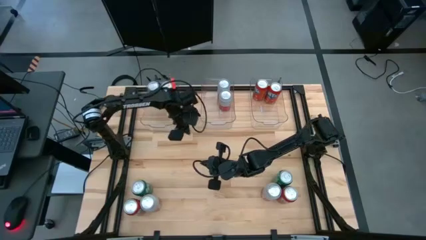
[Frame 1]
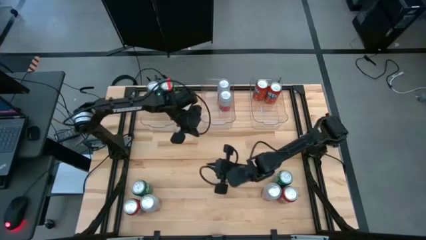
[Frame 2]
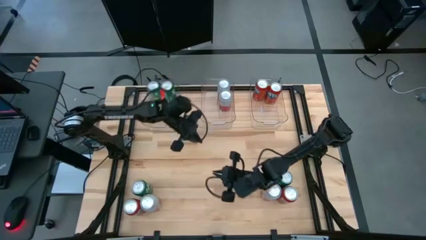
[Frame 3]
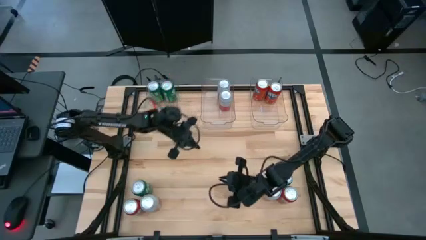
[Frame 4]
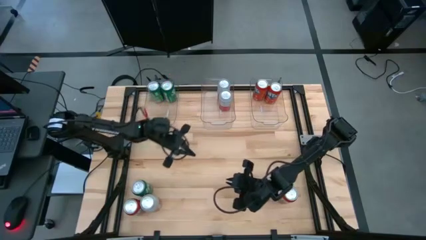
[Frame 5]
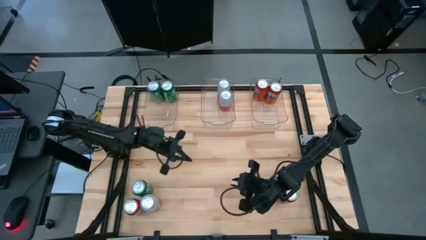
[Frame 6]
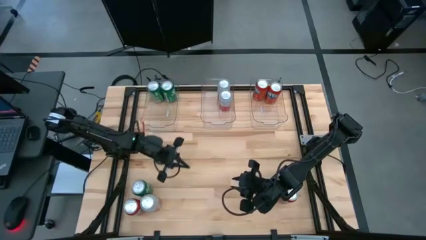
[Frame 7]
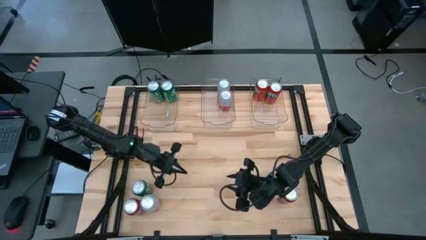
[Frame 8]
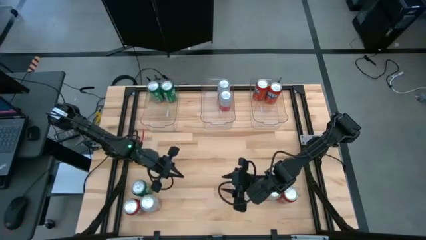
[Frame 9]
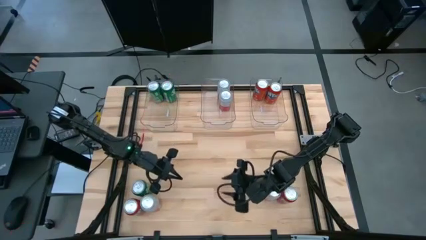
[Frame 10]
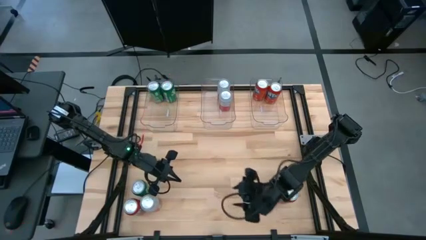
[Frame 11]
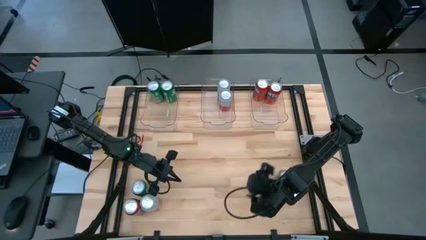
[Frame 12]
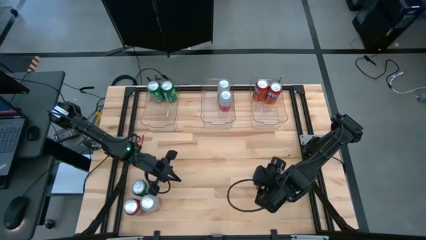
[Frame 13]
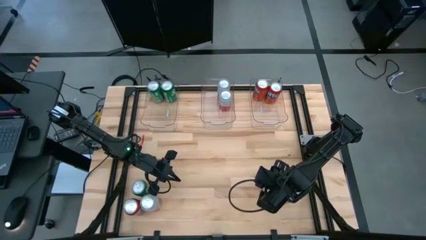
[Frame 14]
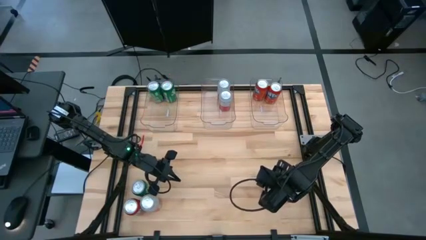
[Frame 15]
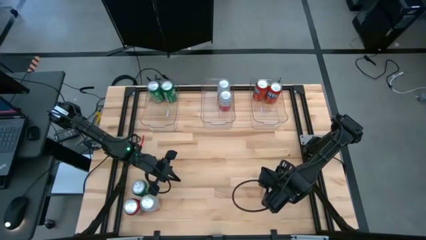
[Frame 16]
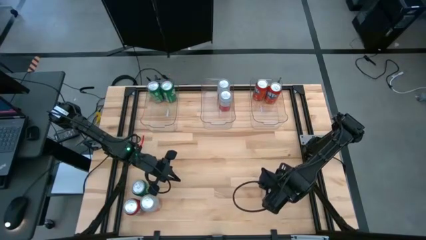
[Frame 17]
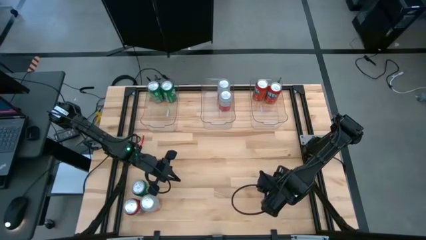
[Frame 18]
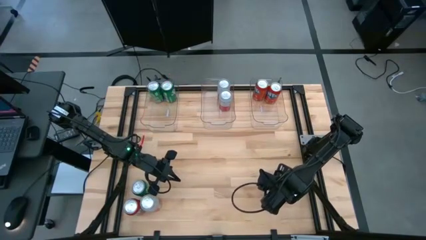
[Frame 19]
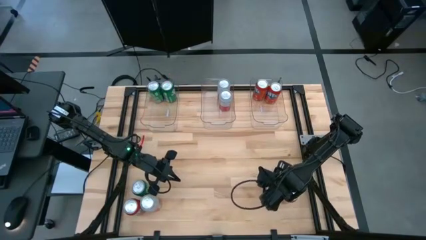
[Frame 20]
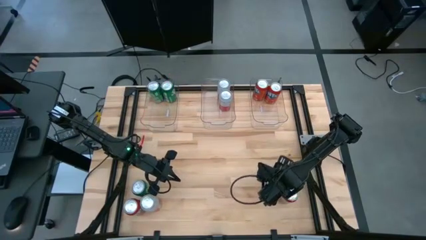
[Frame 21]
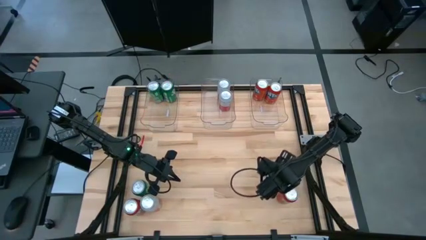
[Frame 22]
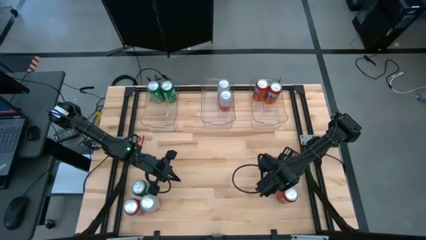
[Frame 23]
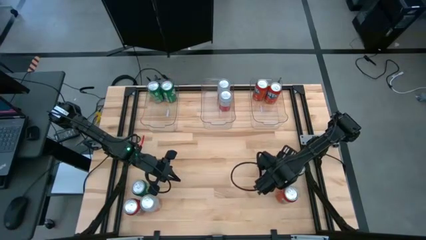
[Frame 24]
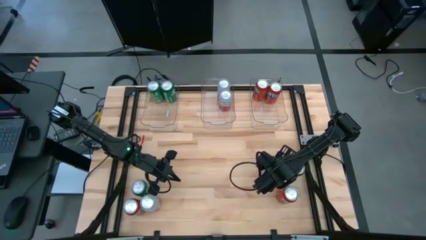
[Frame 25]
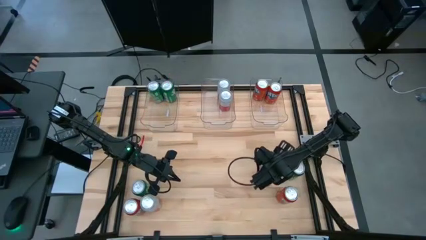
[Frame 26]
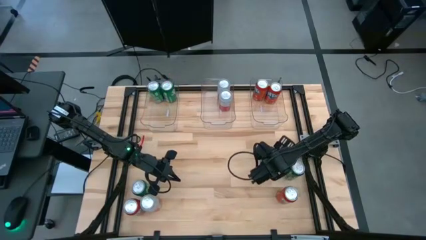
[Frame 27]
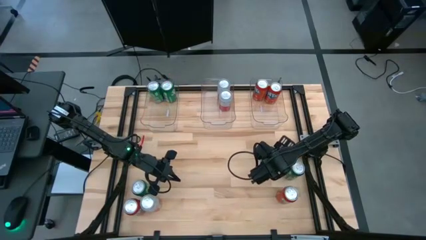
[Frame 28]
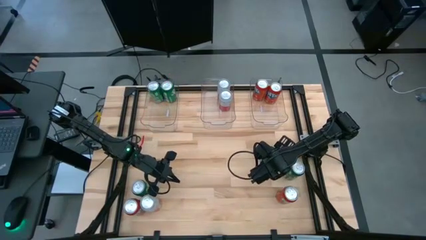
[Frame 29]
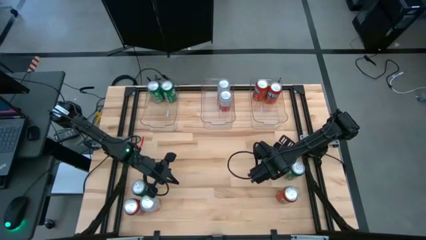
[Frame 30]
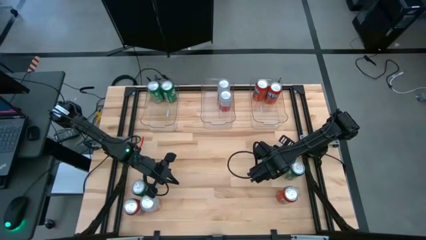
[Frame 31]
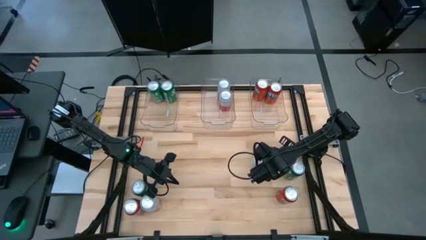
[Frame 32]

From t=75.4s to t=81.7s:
Task: Sort soda cans
Put the pink-white soda can into the middle transparent bin

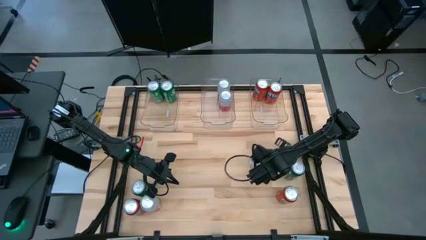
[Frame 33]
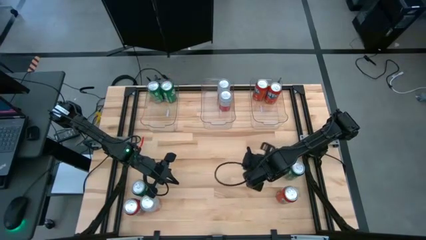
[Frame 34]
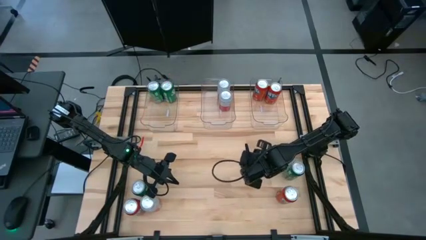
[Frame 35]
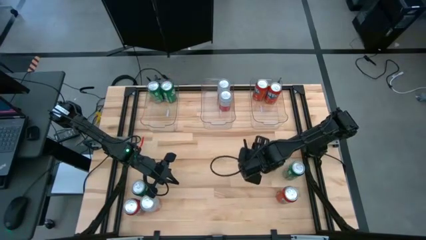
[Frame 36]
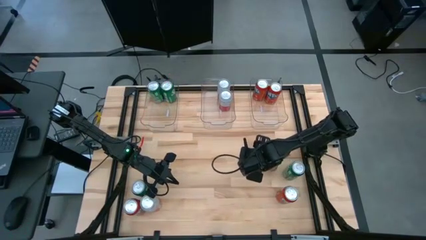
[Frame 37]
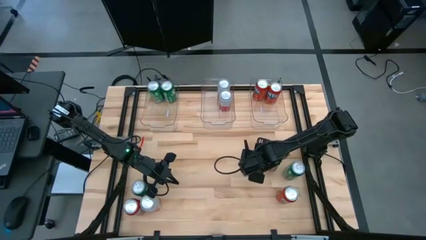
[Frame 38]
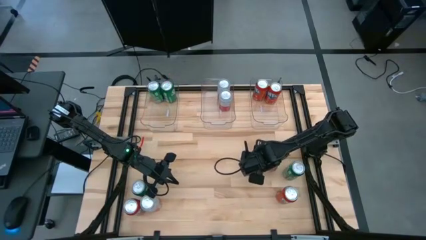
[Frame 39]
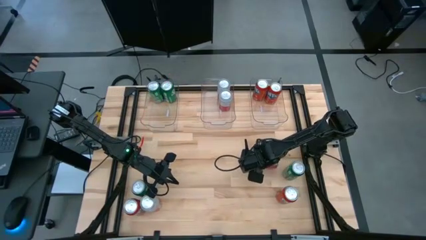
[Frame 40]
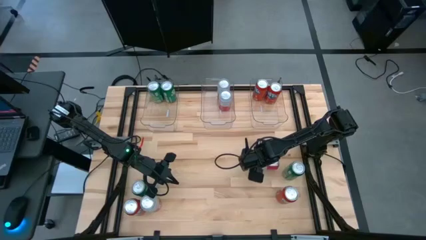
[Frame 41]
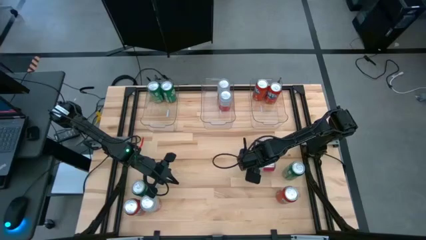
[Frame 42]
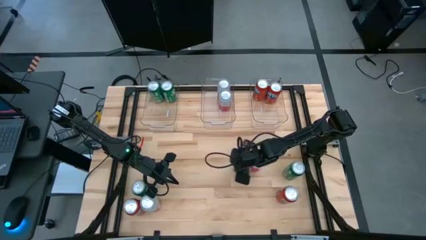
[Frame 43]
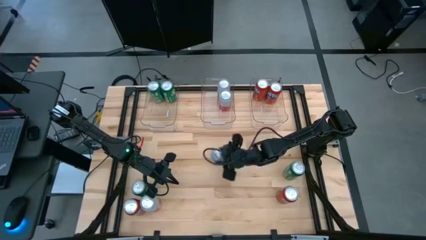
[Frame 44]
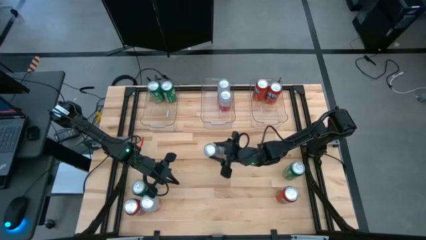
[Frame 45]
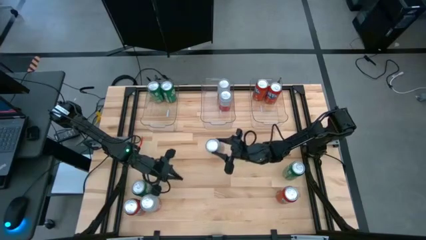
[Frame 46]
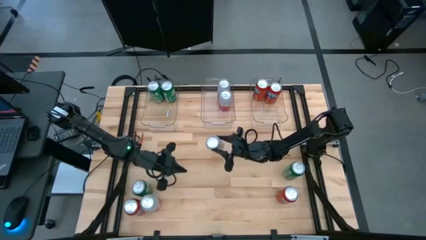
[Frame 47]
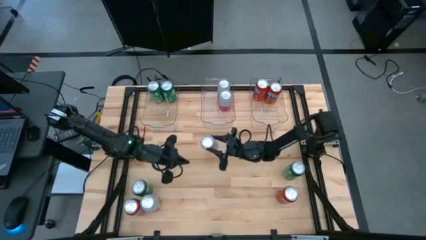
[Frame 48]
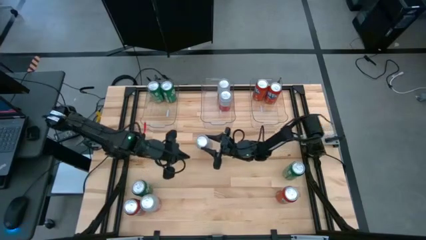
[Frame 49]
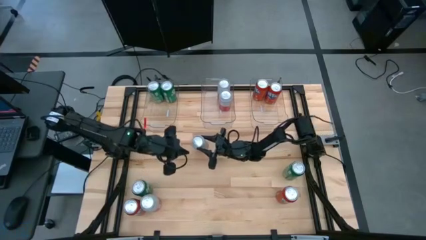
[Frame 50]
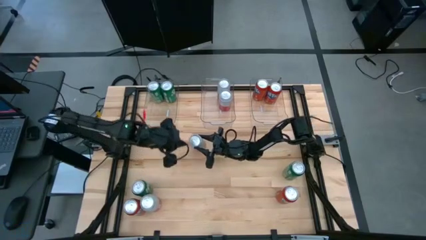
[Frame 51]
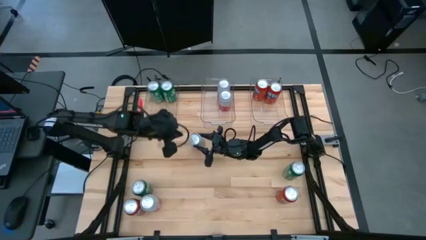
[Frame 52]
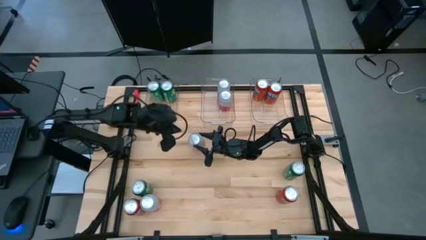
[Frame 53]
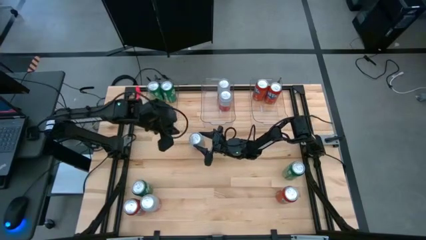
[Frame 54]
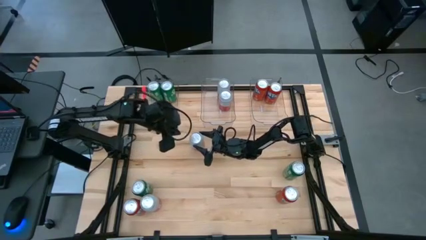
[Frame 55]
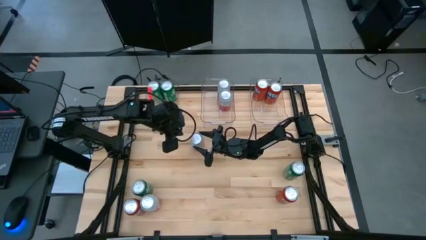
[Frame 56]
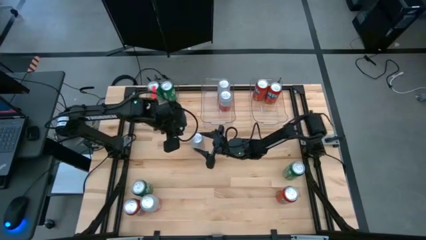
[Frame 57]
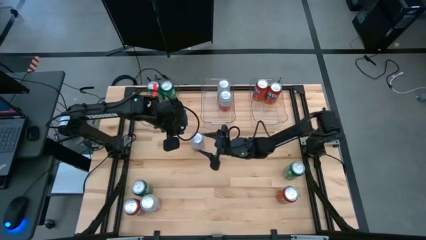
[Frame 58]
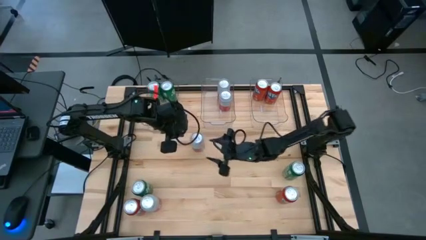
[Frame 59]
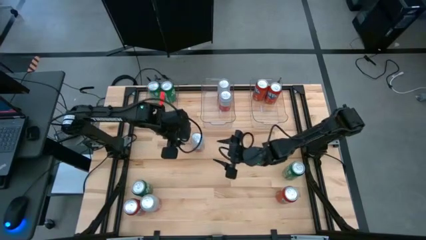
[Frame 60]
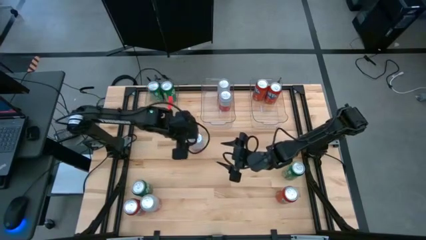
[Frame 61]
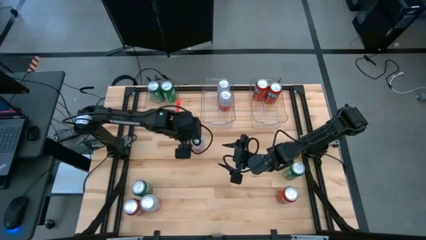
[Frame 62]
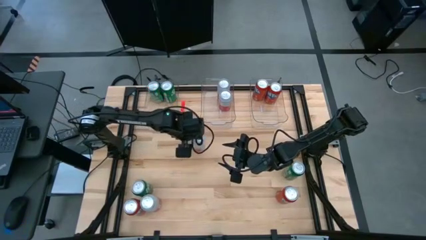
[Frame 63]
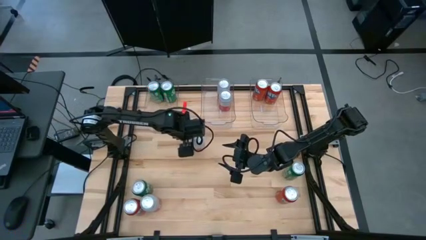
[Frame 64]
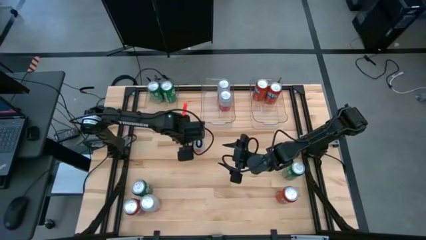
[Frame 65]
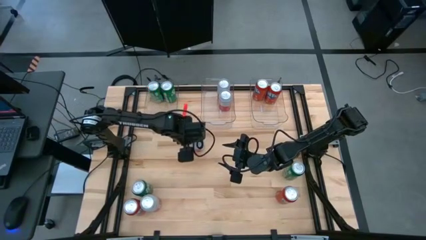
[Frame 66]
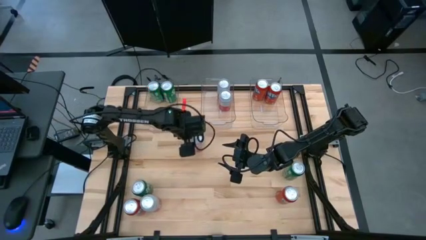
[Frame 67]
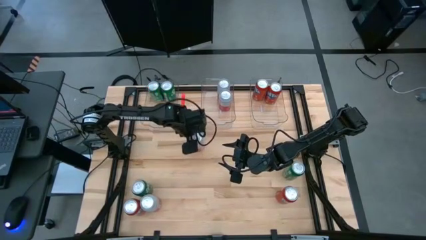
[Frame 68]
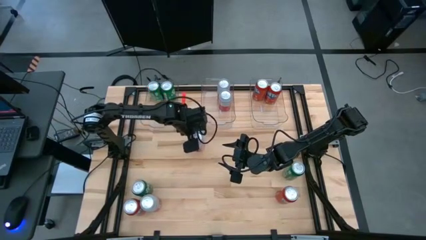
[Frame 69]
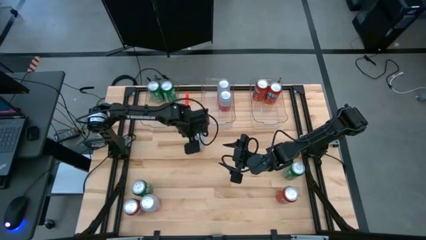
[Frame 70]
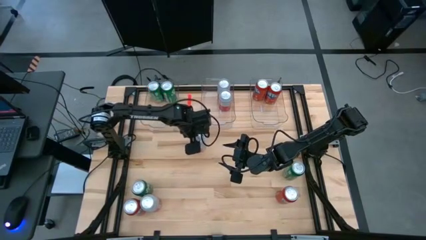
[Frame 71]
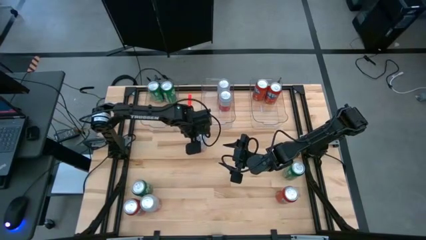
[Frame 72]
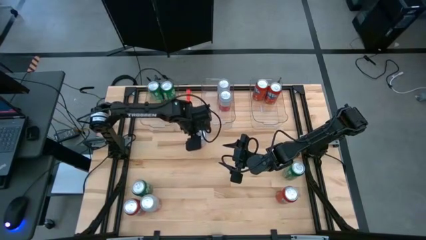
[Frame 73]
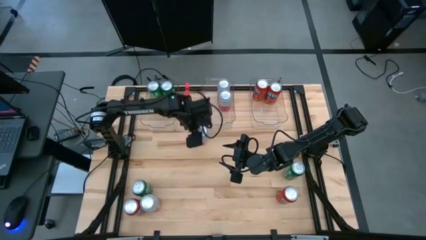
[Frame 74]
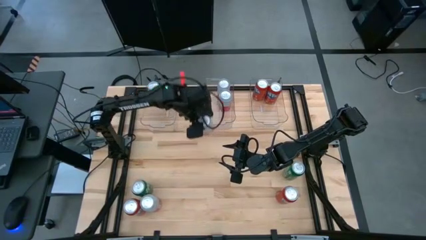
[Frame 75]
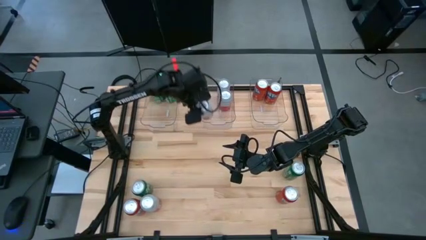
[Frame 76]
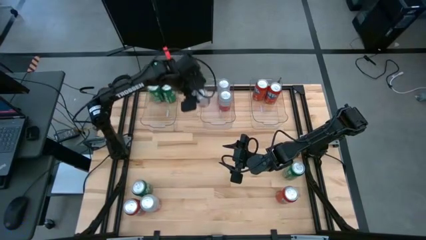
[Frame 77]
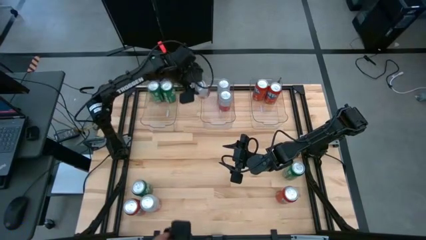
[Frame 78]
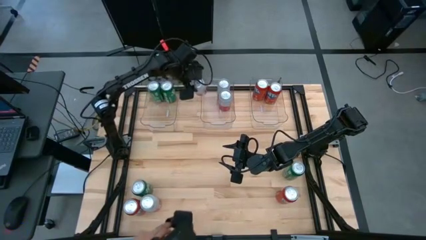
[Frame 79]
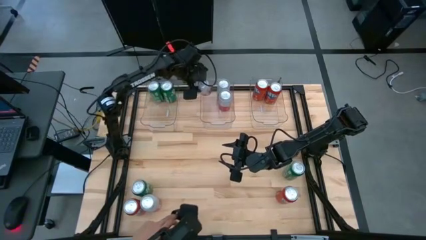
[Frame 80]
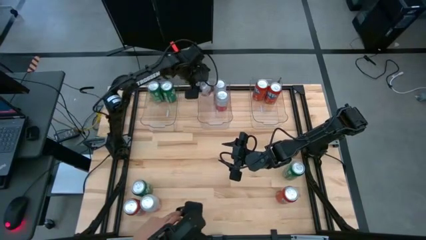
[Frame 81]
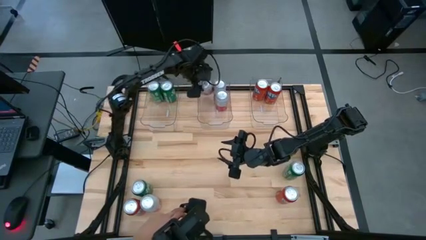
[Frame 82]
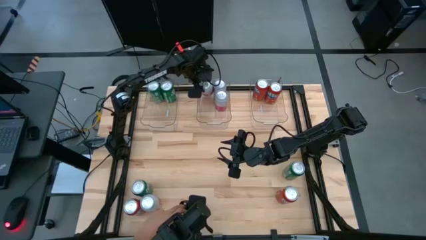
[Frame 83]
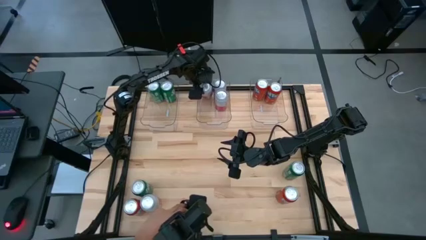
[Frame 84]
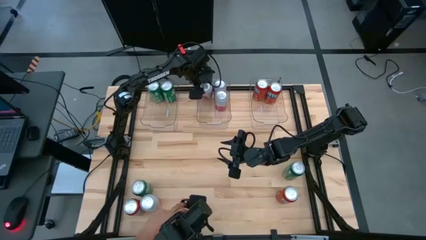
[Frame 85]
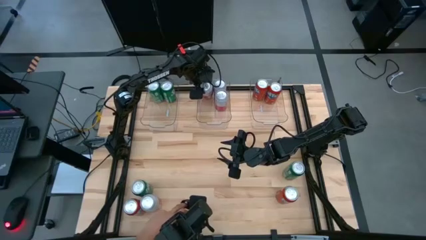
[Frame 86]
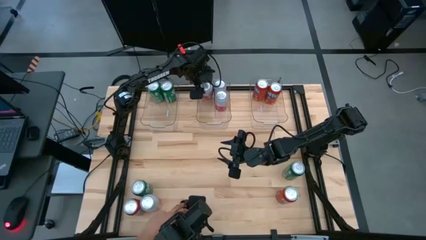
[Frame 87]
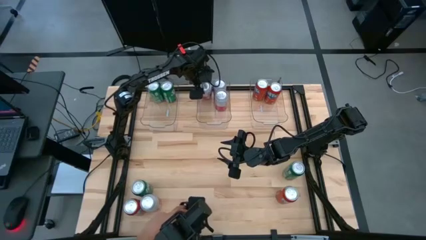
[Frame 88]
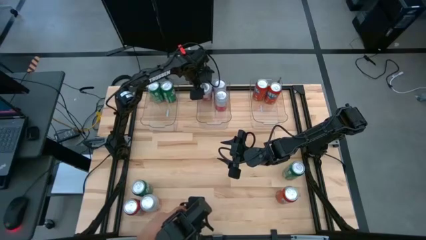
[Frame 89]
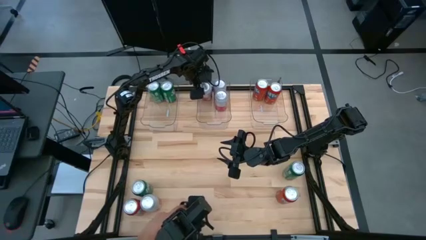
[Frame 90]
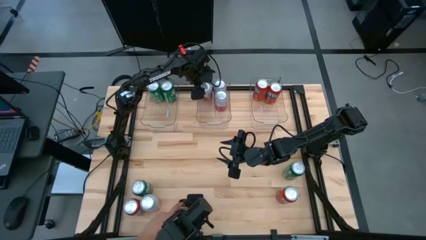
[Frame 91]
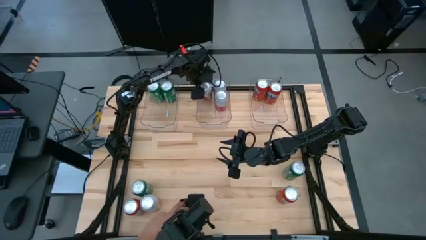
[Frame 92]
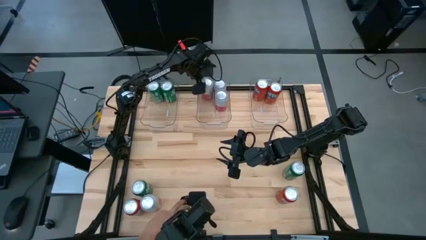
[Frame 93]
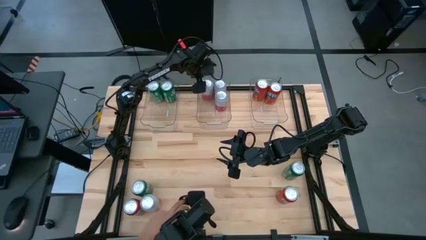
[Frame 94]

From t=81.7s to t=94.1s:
Put the pink-white soda can into the middle transparent bin
